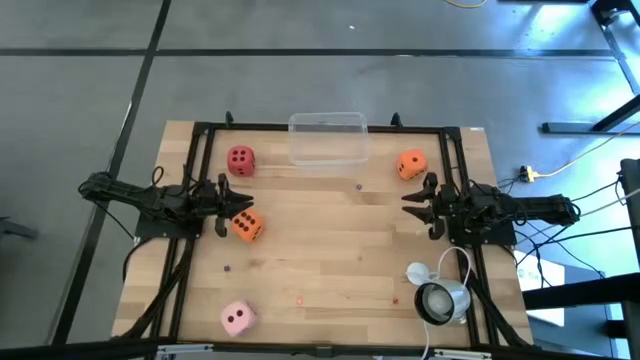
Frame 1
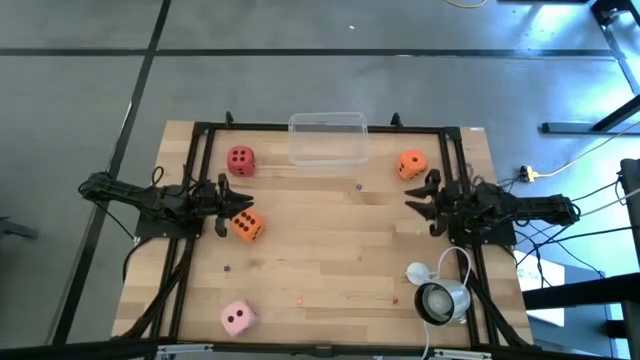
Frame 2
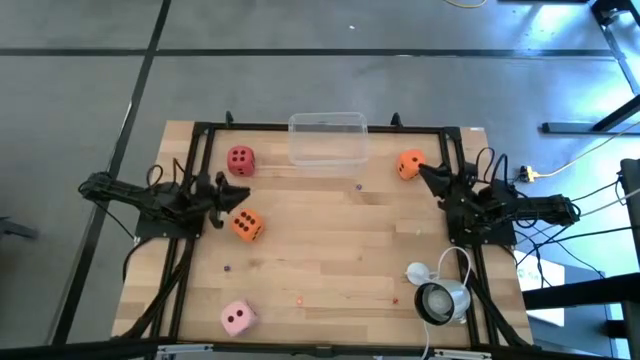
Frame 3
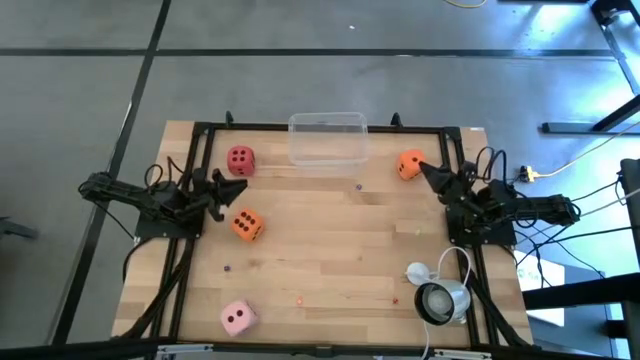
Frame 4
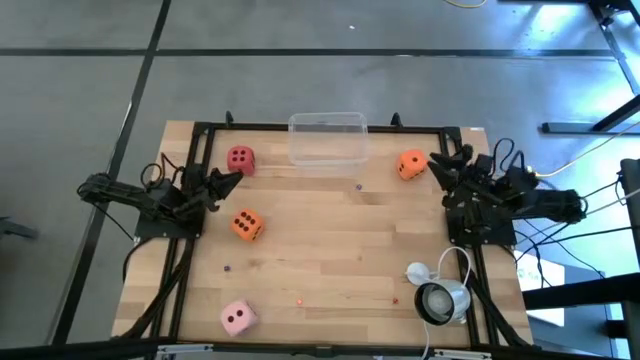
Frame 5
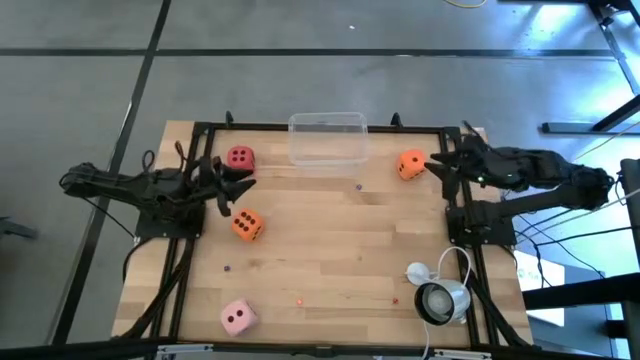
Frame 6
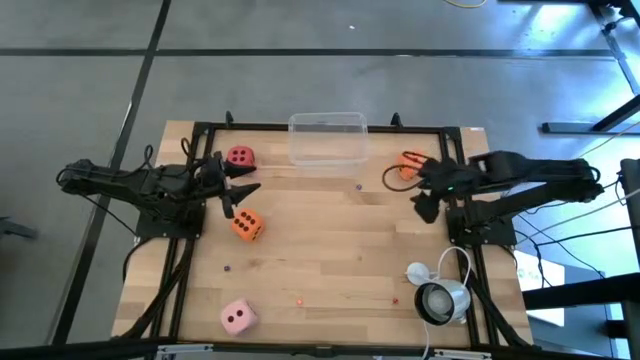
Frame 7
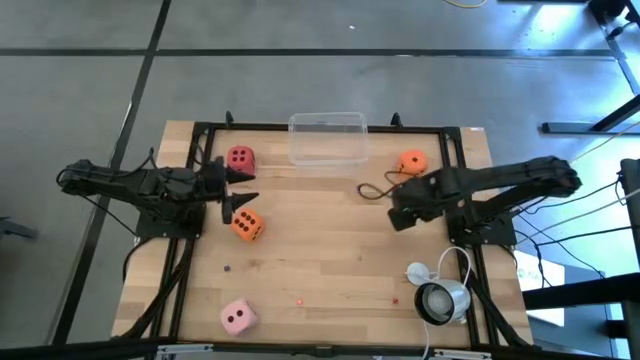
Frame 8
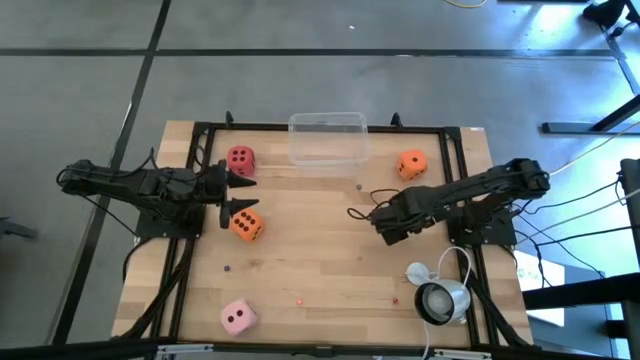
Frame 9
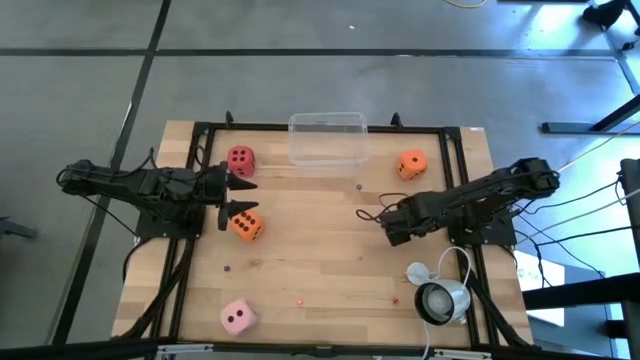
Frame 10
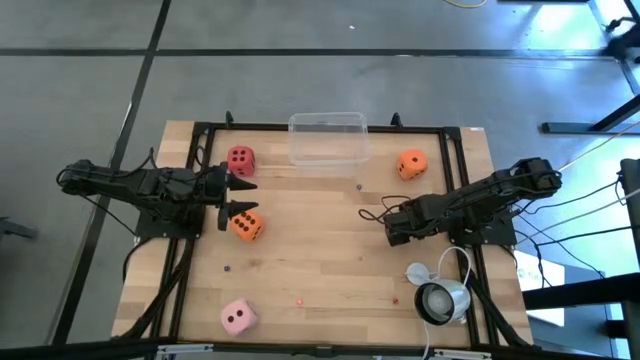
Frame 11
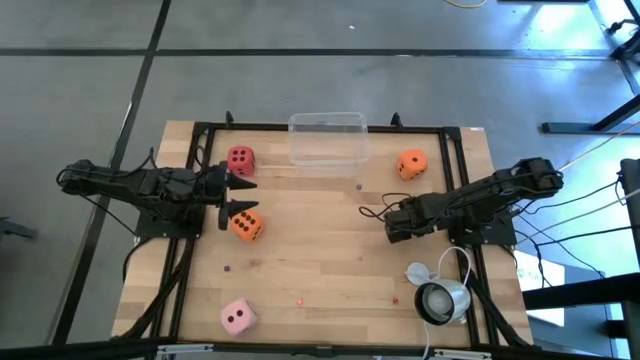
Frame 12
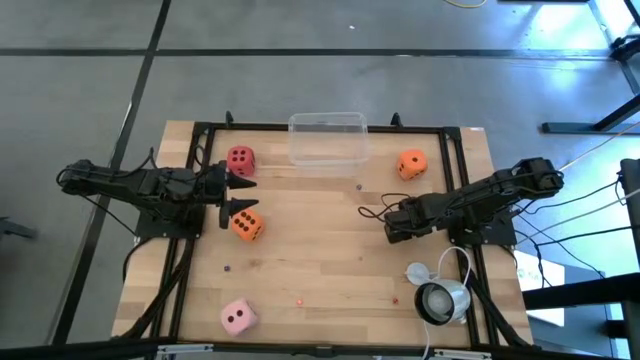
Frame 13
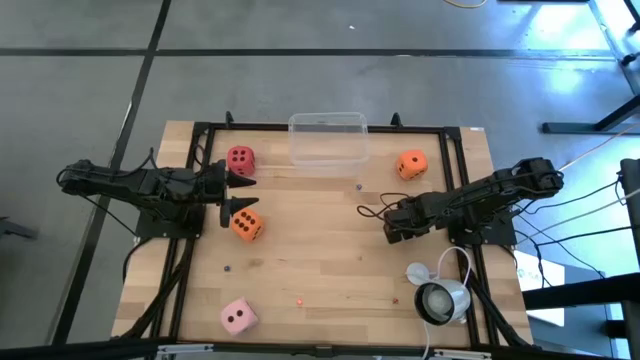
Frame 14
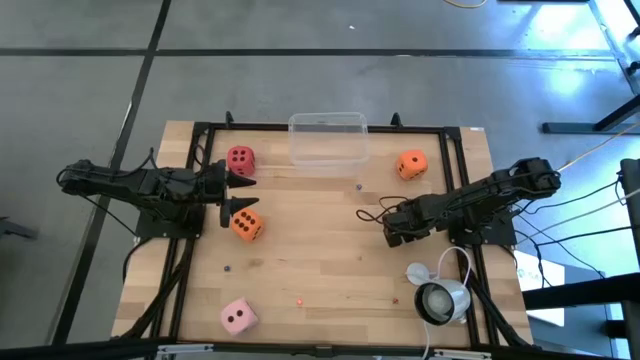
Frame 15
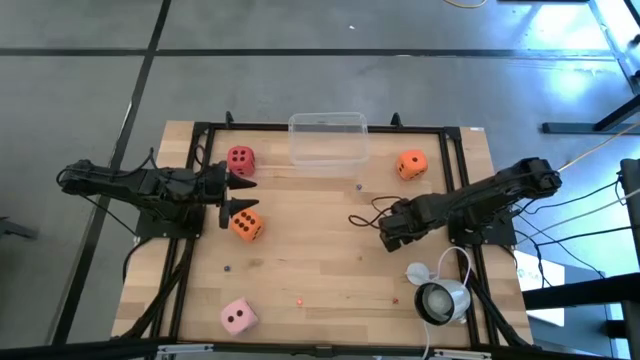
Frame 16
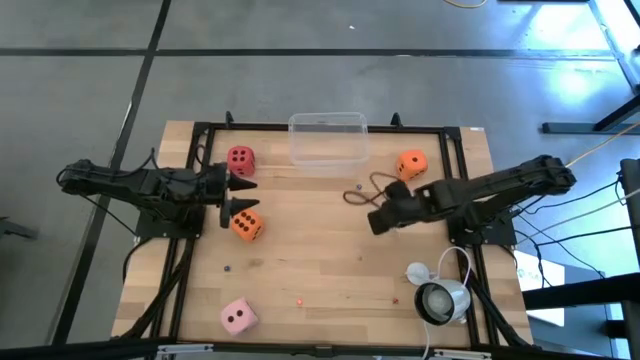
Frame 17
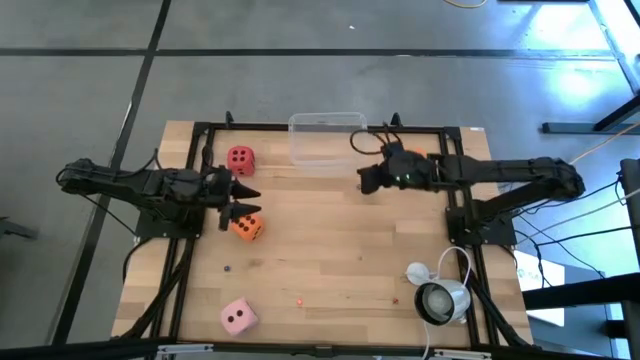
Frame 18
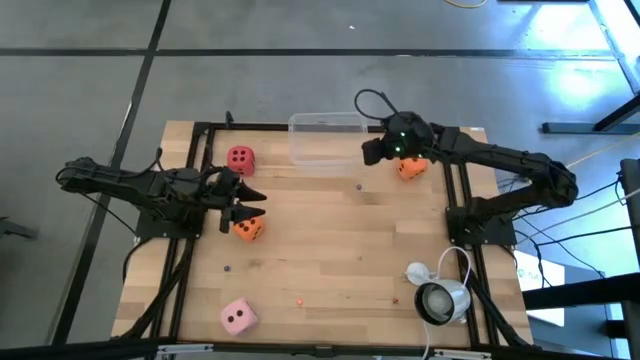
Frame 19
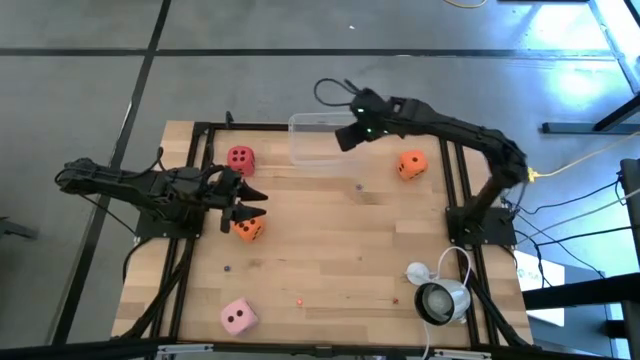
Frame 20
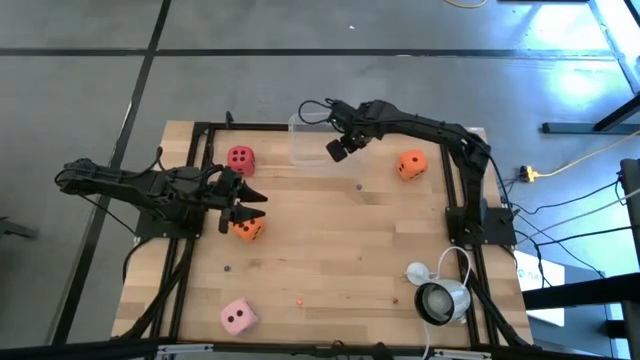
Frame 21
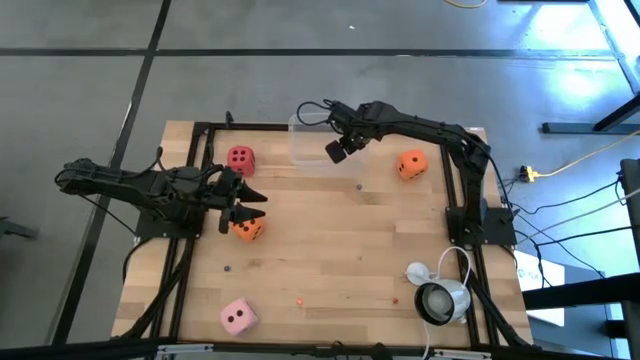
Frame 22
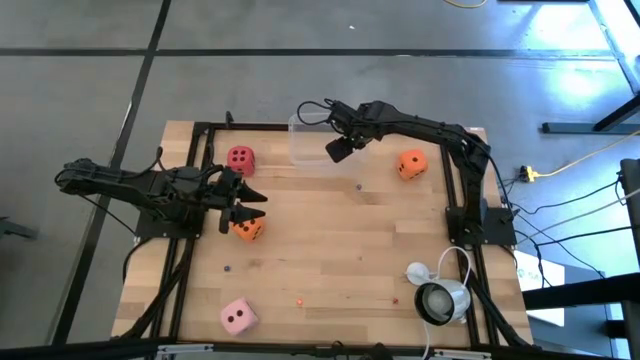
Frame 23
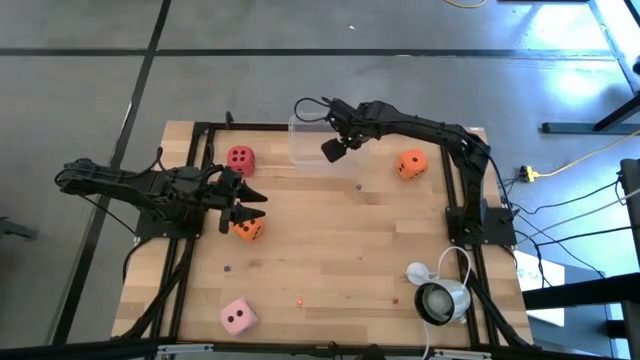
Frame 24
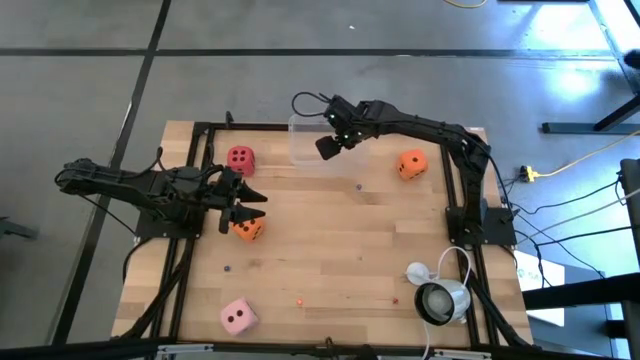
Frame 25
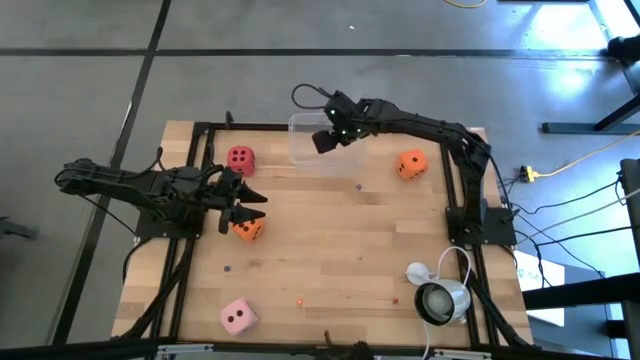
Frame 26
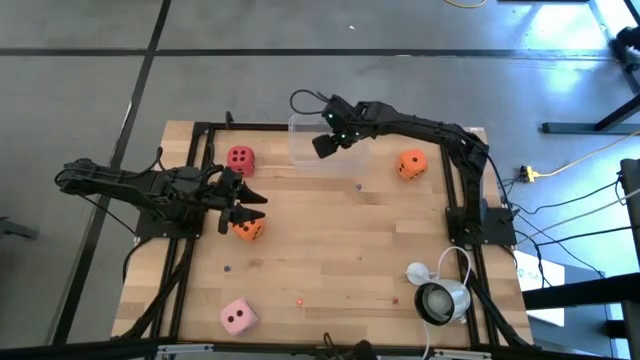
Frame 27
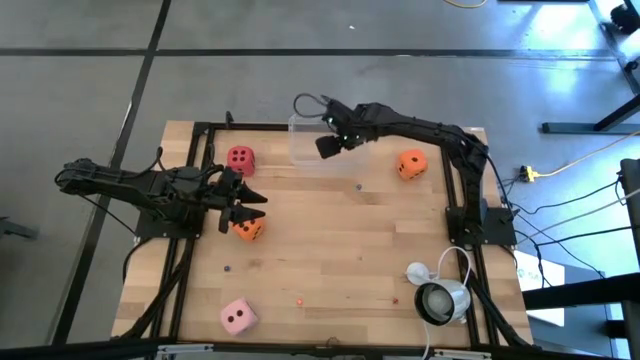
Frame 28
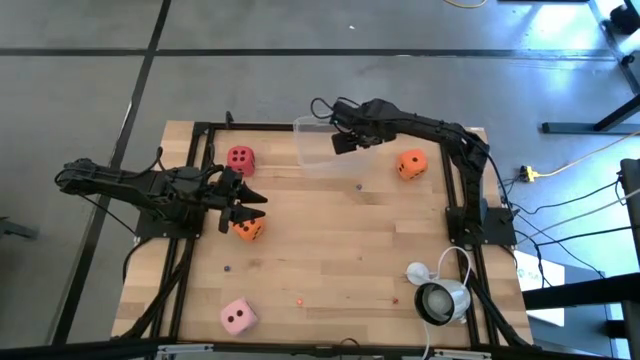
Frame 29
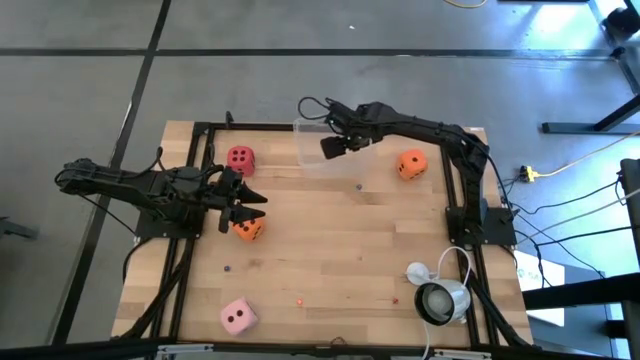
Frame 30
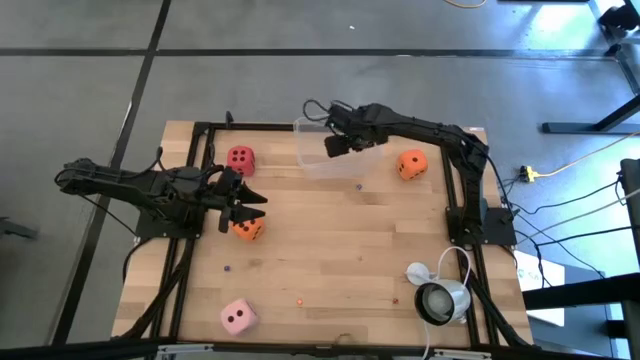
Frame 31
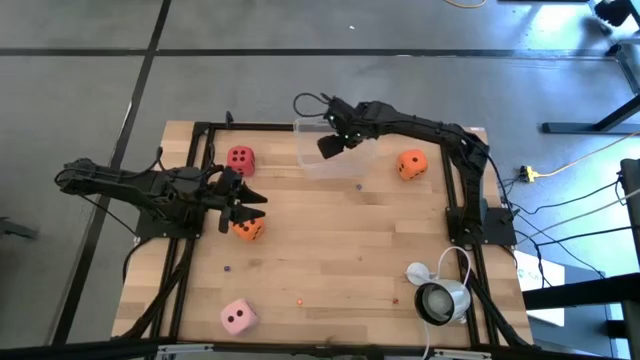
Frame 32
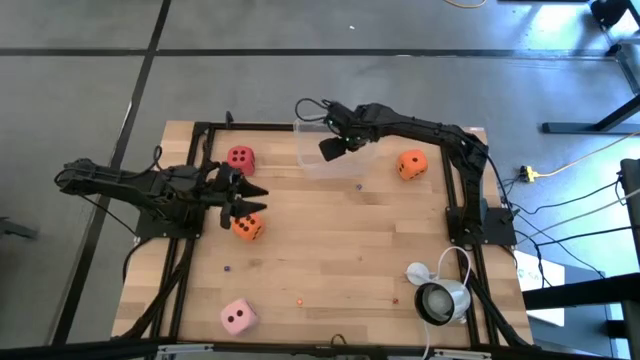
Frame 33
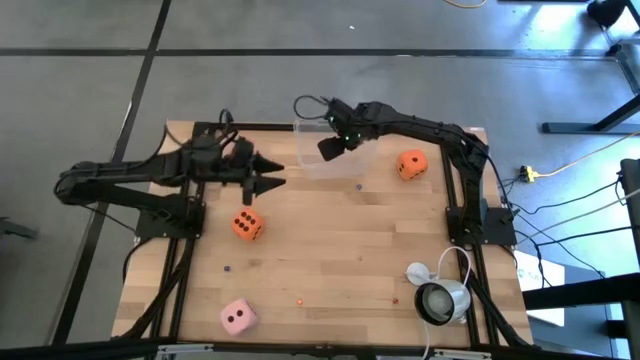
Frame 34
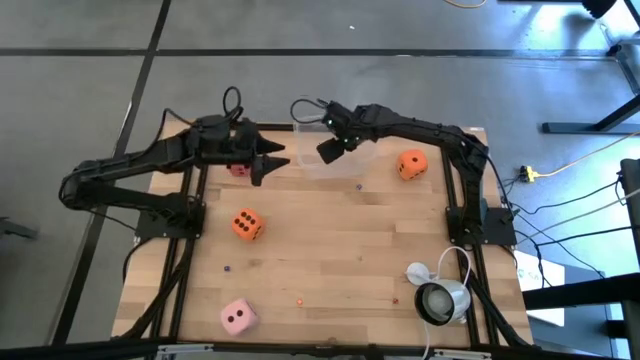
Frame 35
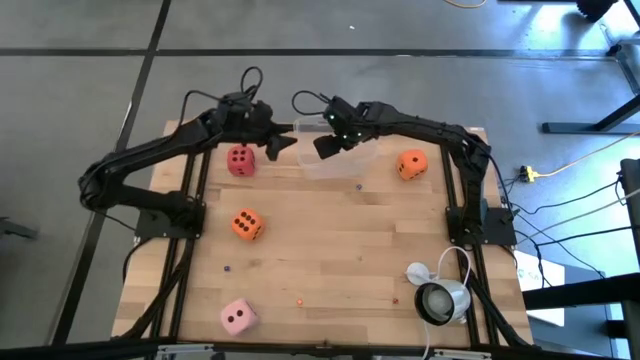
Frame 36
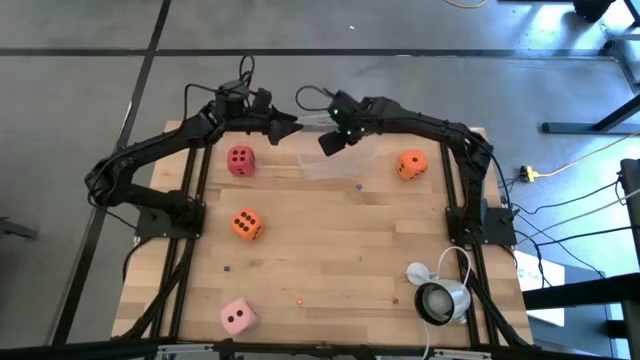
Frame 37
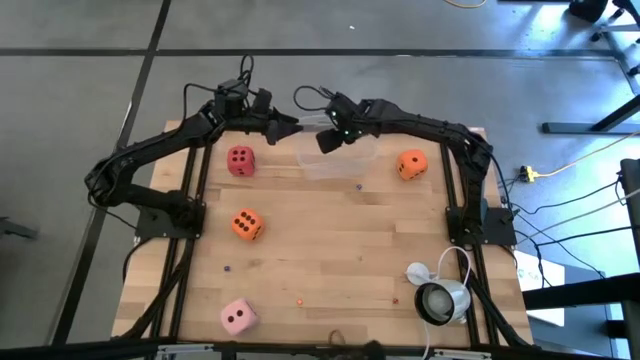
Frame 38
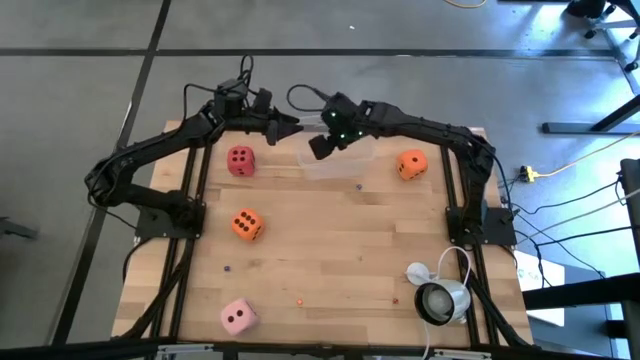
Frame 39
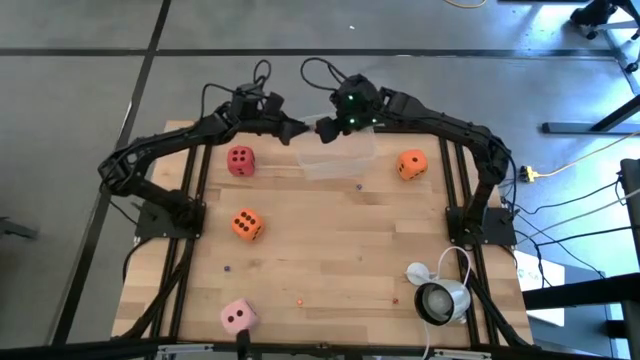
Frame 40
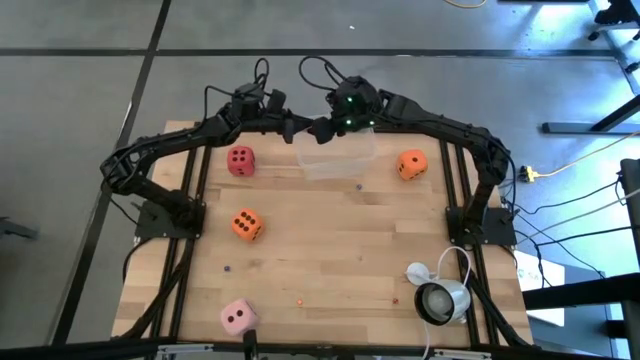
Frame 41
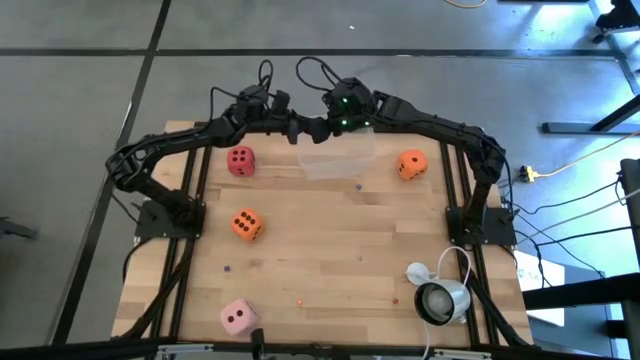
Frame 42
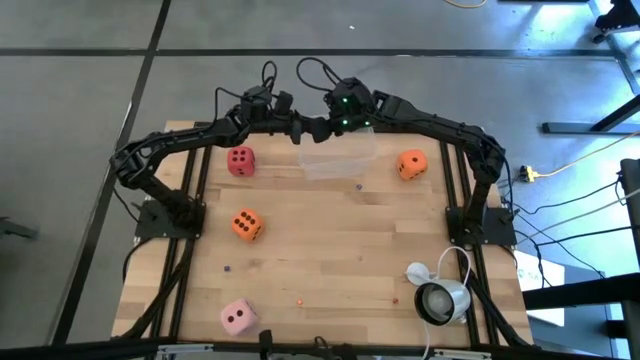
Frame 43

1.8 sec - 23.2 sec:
Task: Pick & Place Dice
Put the small green dice into the transparent bin
